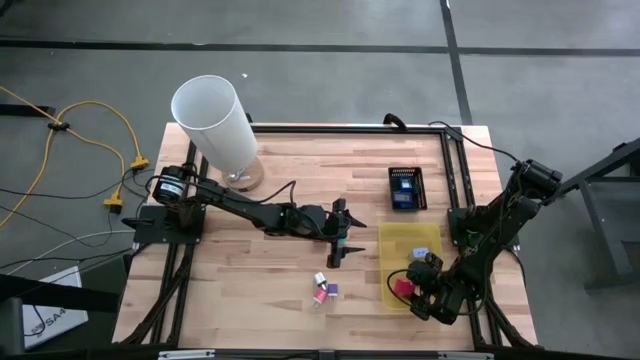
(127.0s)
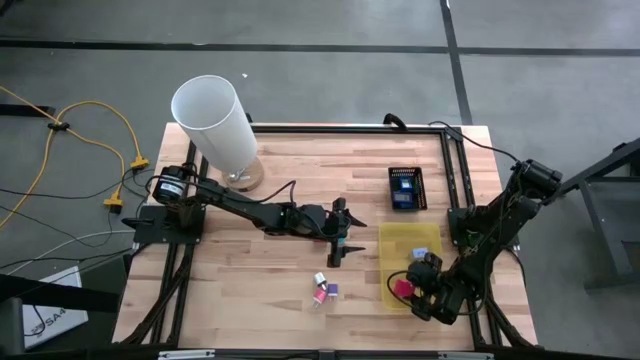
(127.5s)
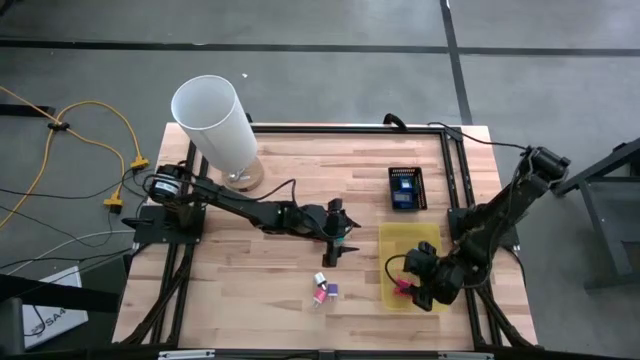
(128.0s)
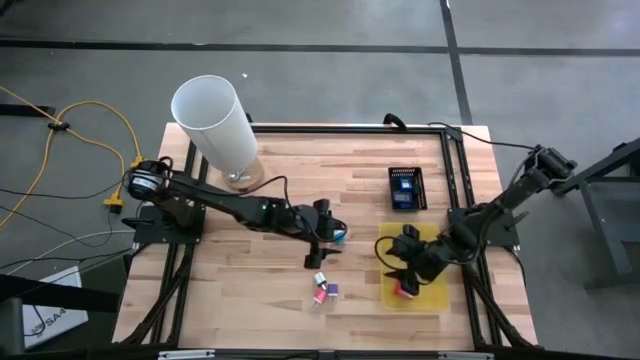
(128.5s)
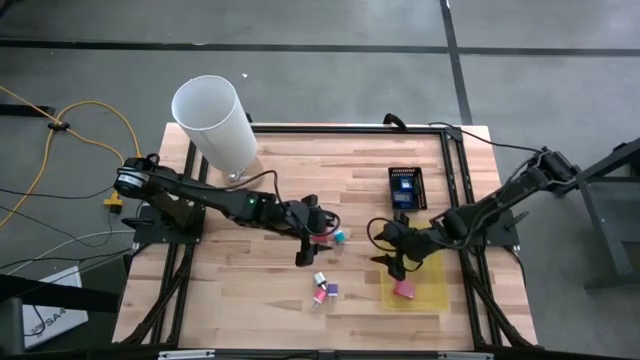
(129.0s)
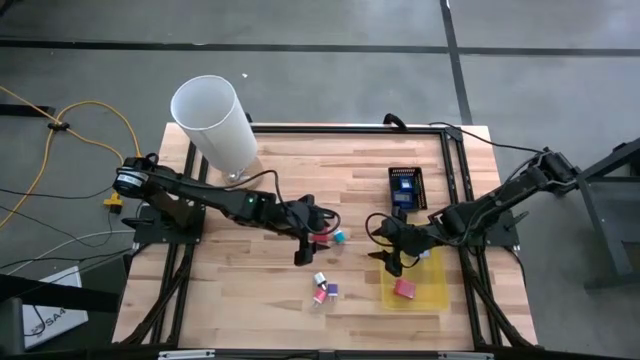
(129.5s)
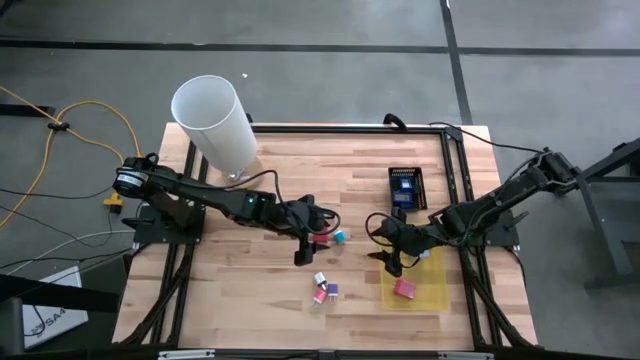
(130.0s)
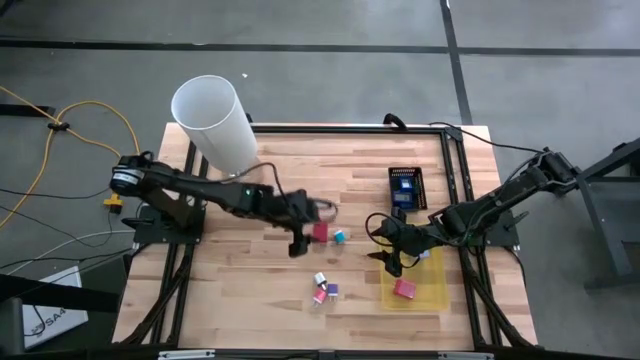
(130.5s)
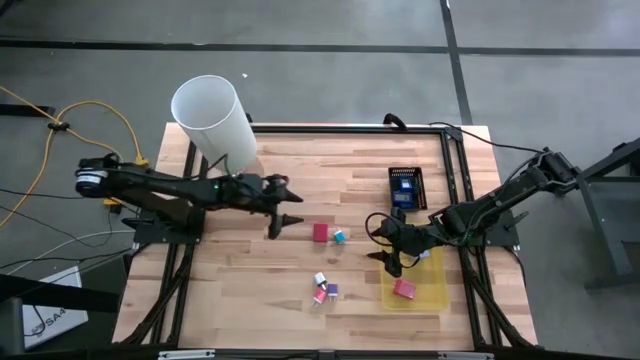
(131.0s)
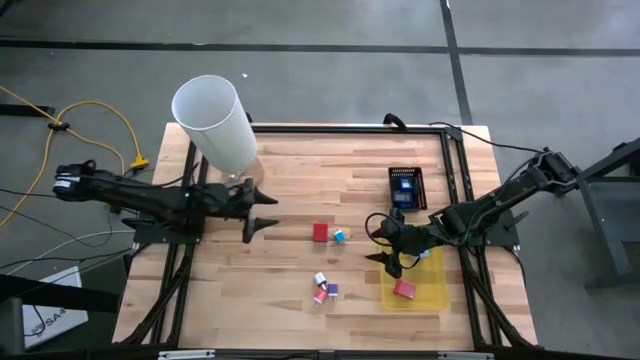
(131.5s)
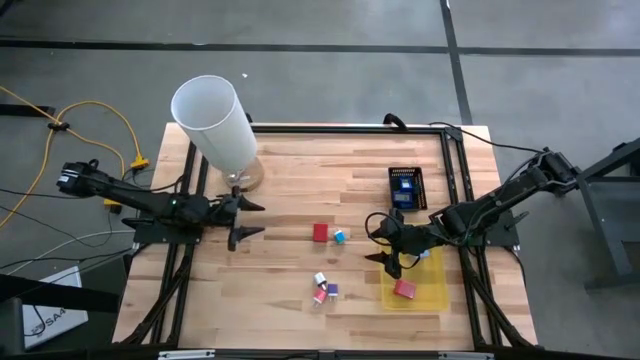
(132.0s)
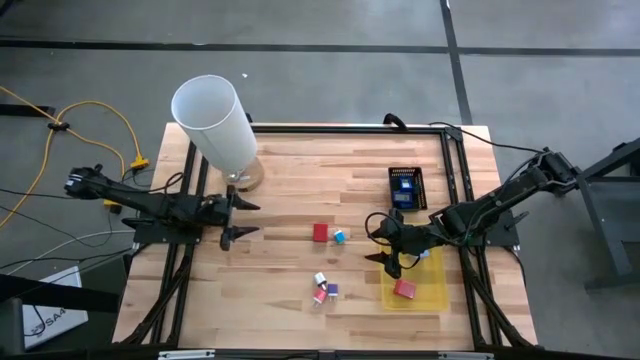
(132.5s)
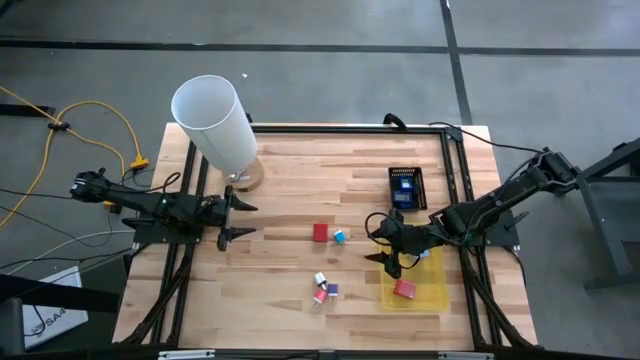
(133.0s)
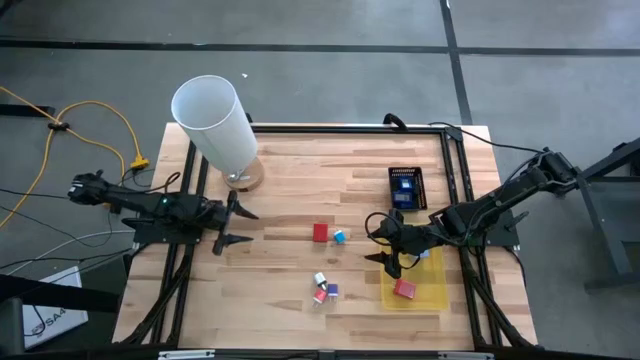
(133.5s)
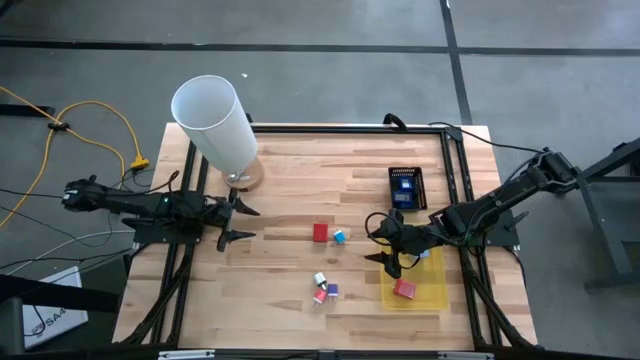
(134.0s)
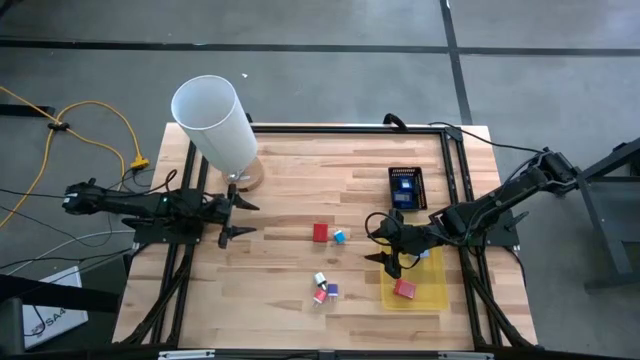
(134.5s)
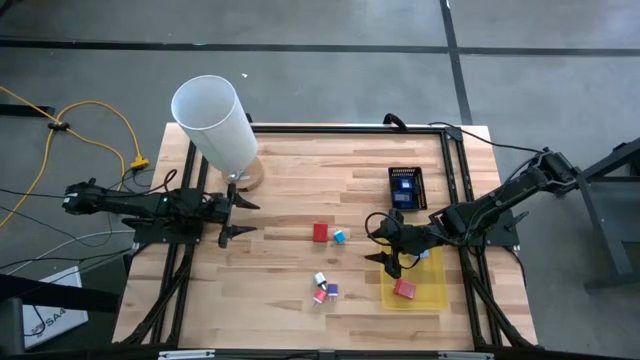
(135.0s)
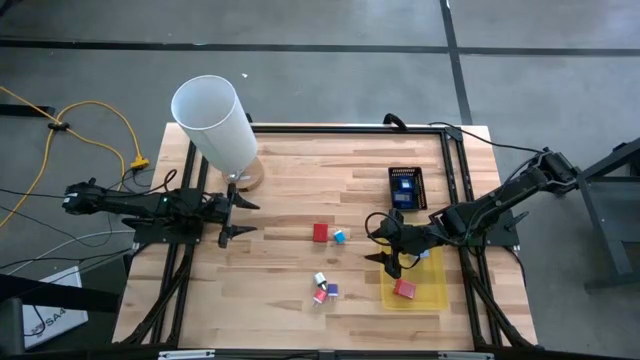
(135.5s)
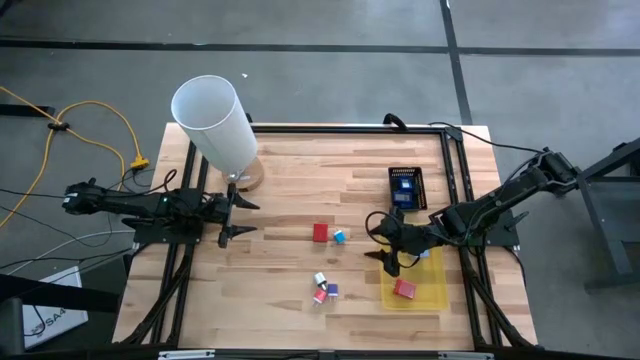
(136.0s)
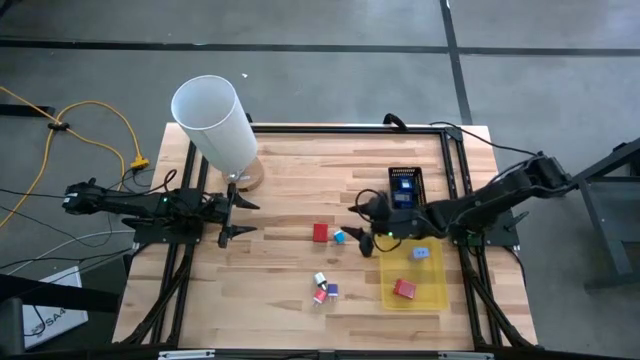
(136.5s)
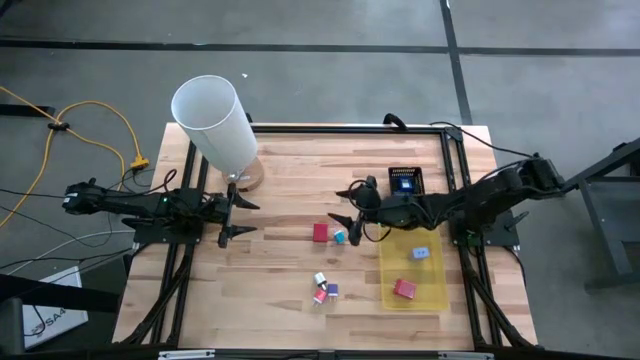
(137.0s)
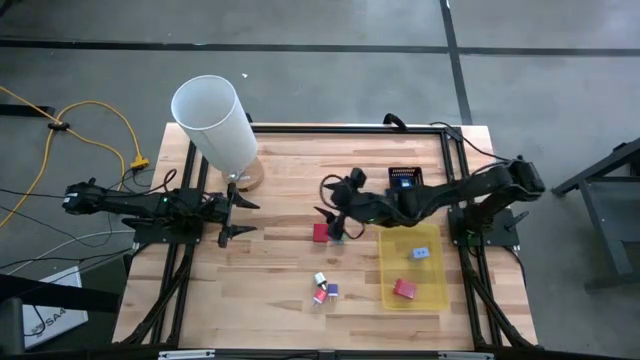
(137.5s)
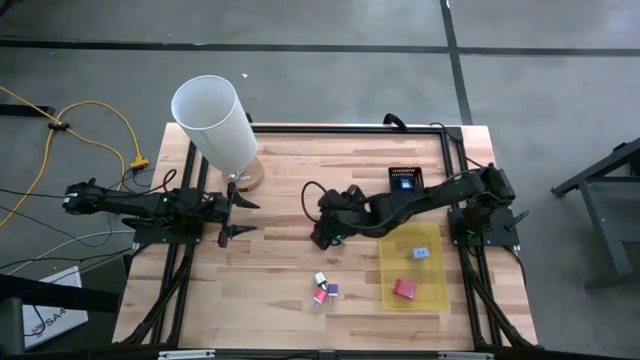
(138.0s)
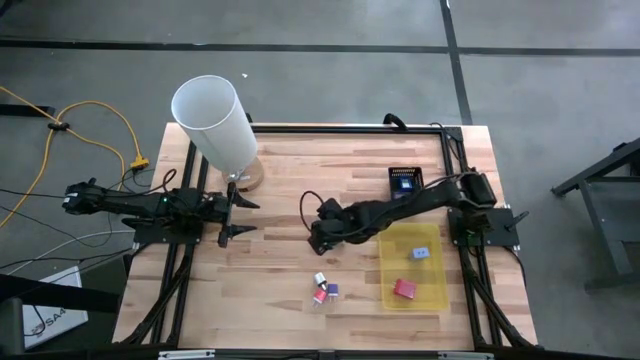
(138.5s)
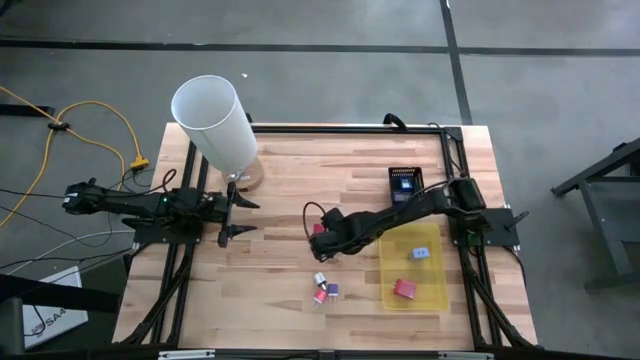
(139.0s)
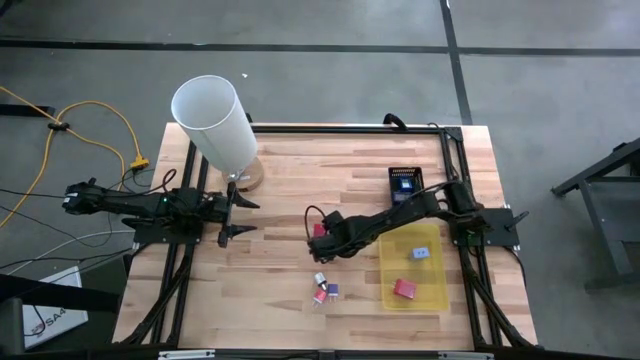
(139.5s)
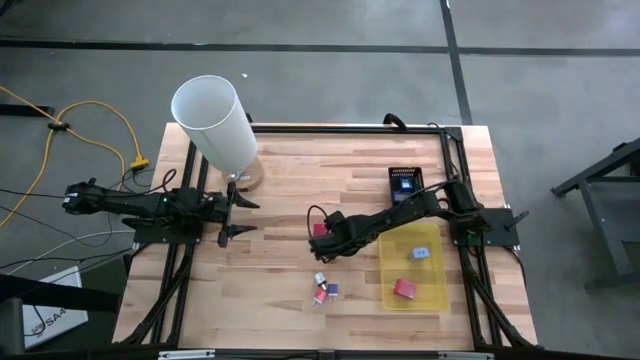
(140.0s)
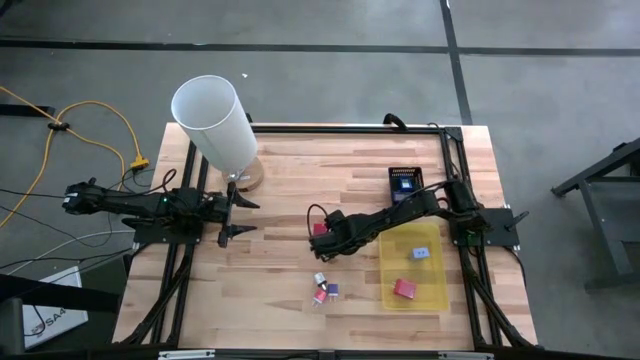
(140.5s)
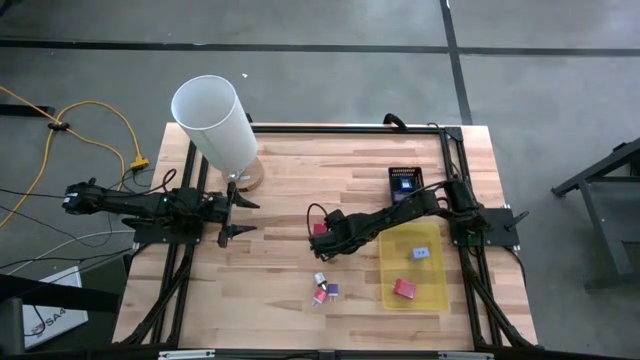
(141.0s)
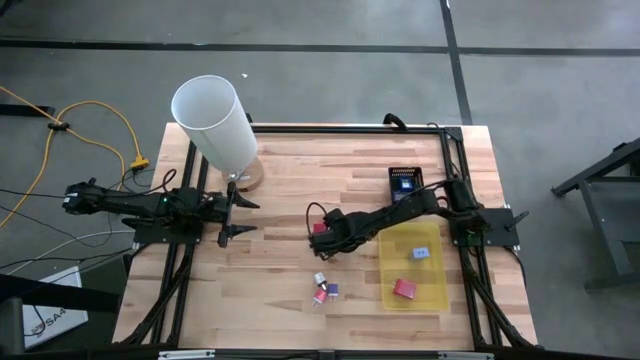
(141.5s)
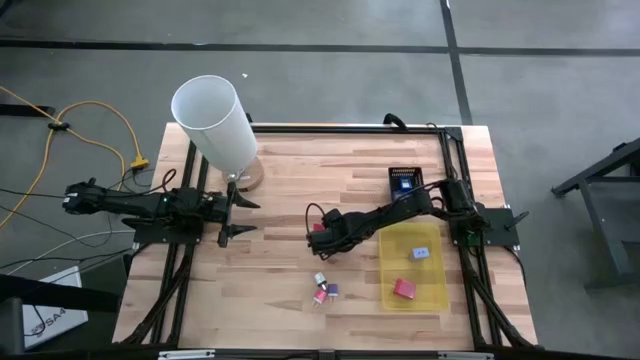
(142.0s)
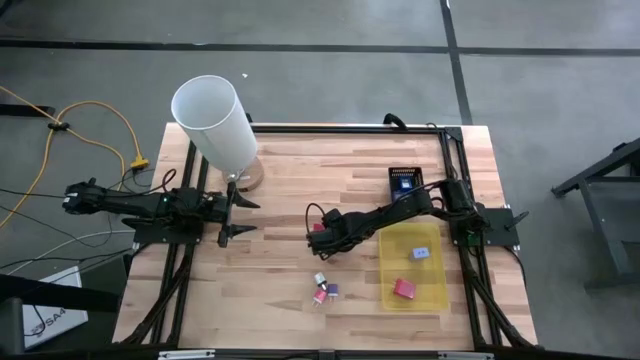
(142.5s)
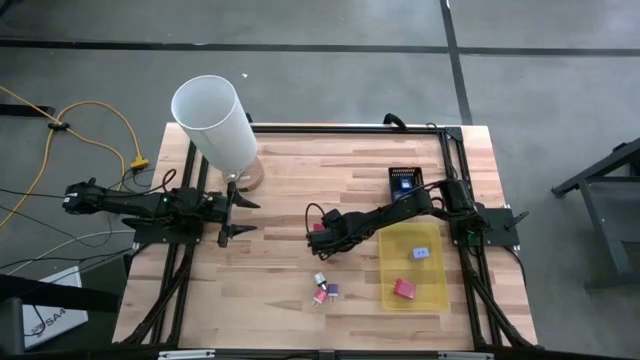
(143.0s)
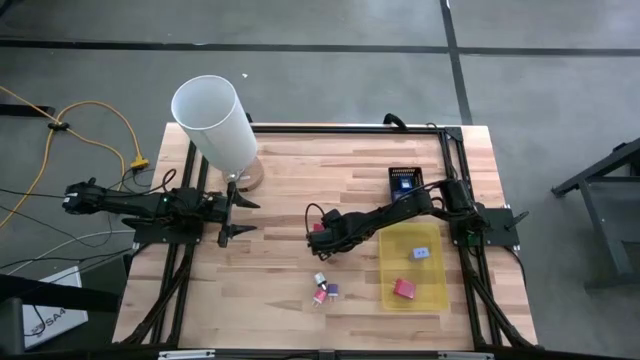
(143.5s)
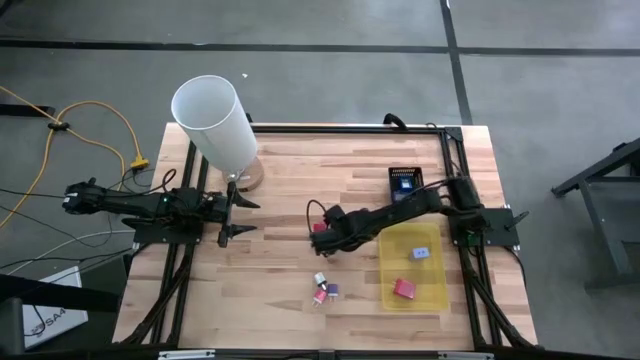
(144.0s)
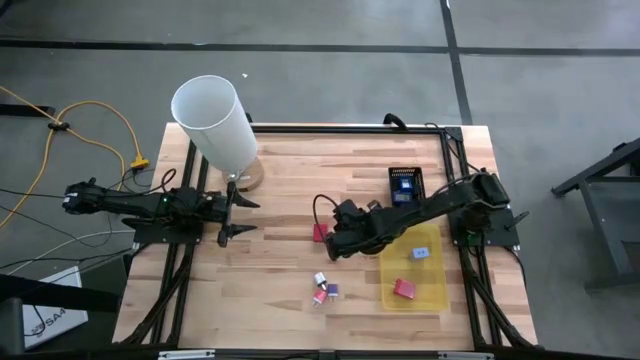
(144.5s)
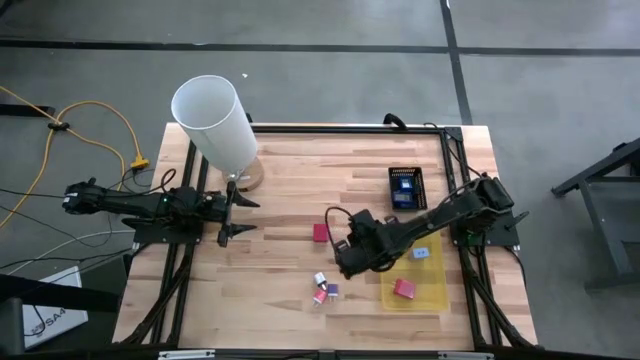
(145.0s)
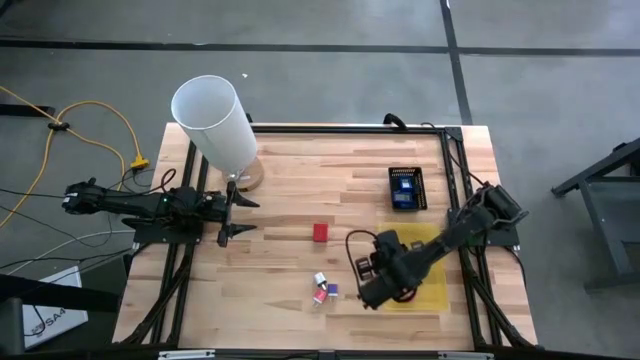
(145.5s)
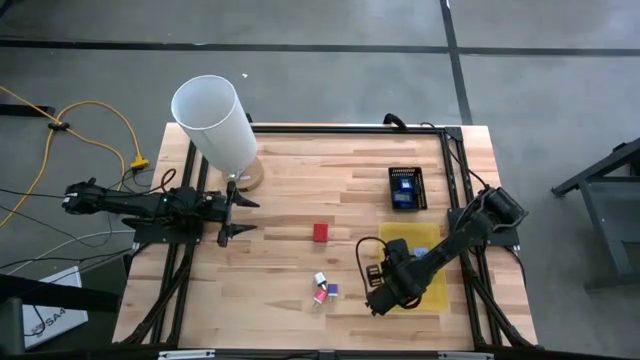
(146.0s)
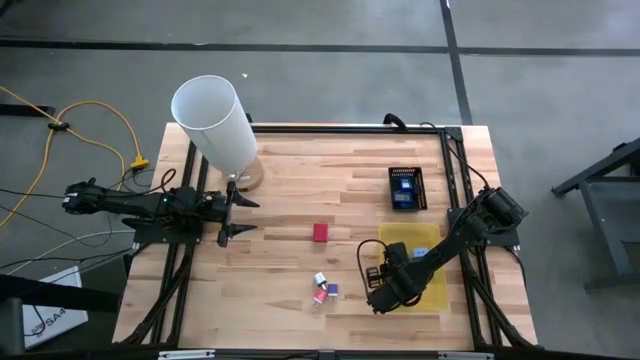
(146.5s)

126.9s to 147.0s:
Task: Pick & Place Office items
Put the light blue charger adapter into the yellow bin

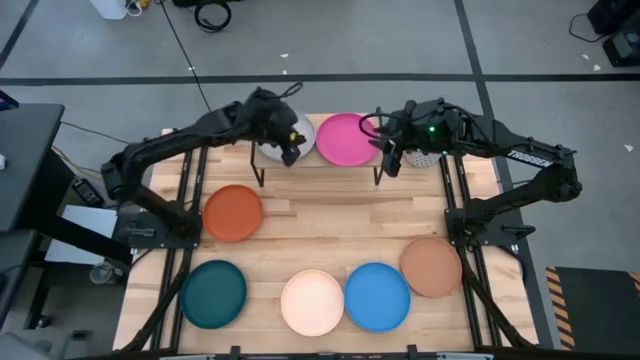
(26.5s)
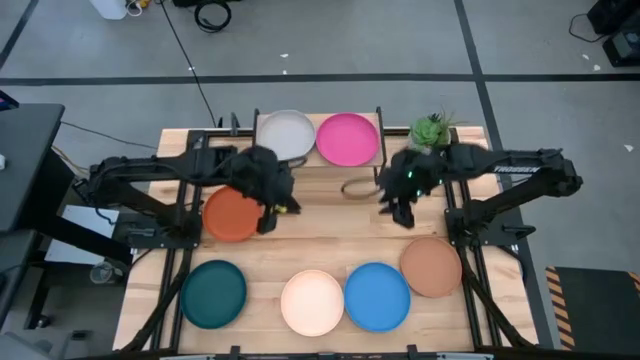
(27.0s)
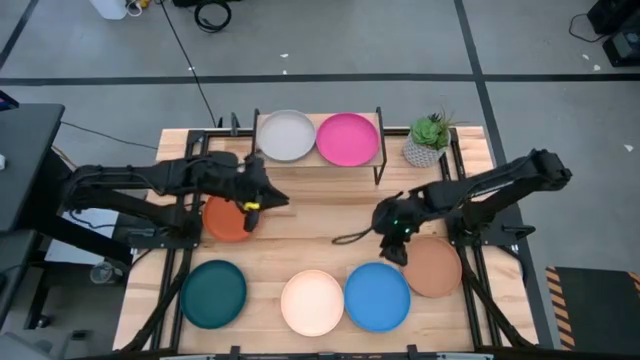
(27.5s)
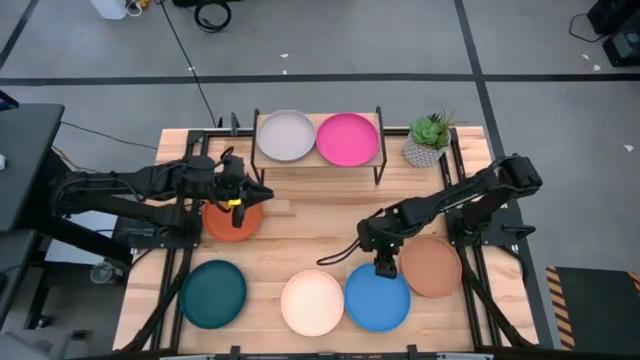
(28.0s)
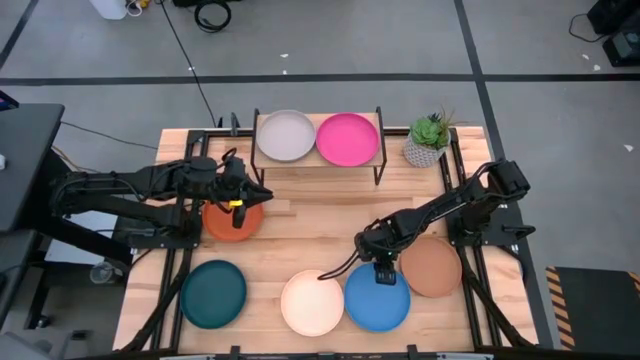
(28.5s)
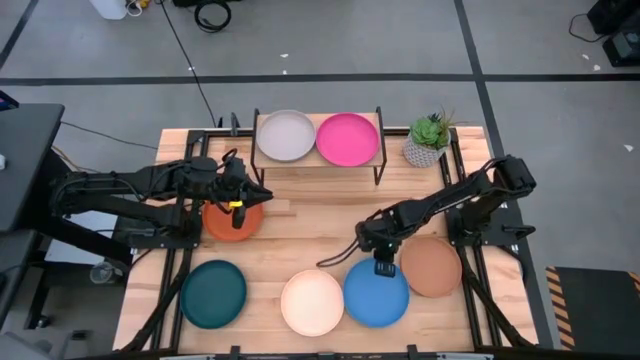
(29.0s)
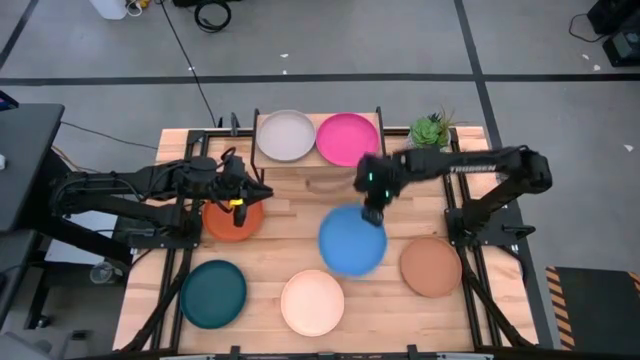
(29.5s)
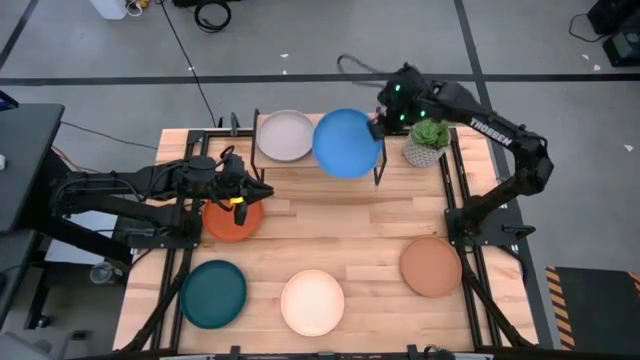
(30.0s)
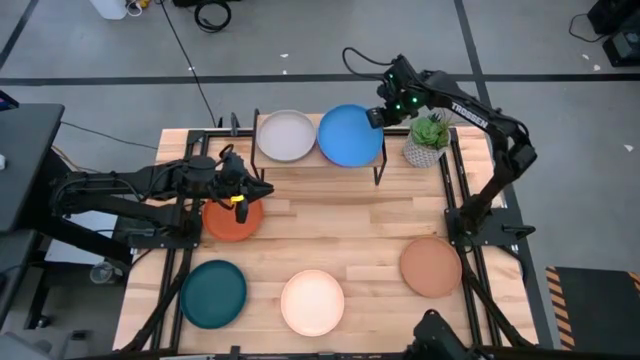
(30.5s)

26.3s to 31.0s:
Task: Place and stack plates onto a shelf
Stack the blue plate on top of the pink plate on the shelf
